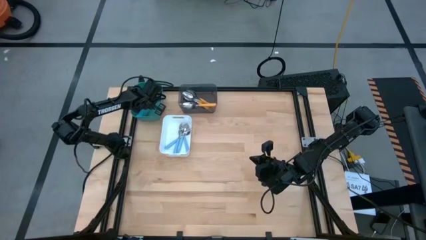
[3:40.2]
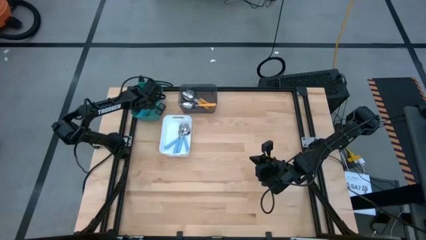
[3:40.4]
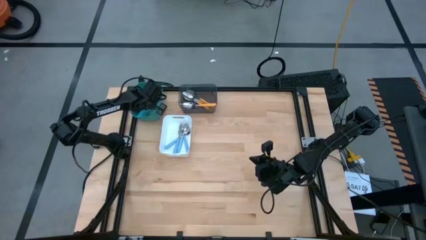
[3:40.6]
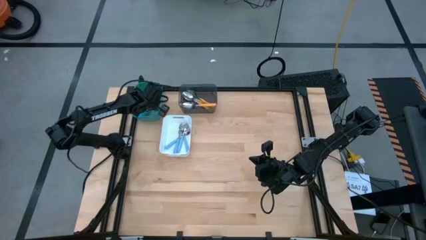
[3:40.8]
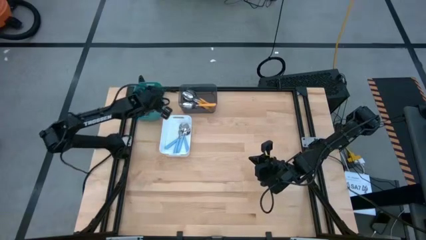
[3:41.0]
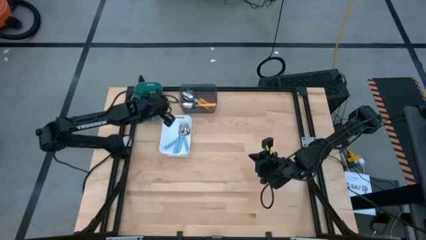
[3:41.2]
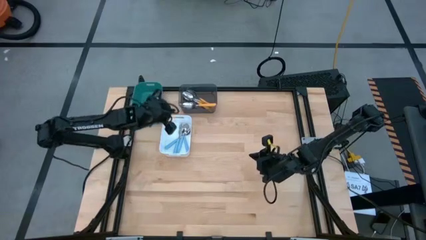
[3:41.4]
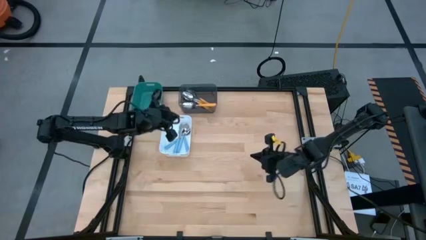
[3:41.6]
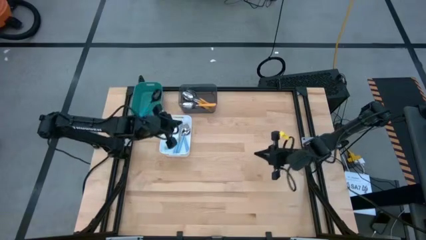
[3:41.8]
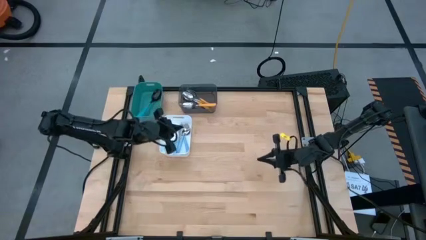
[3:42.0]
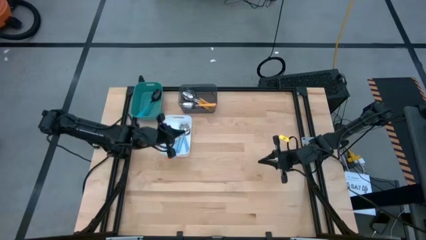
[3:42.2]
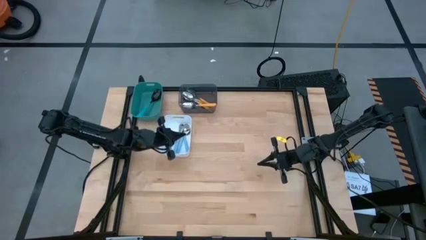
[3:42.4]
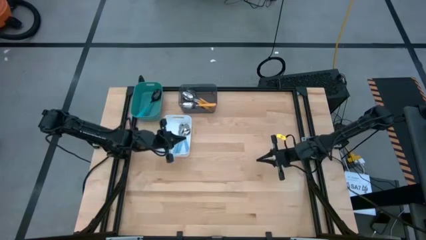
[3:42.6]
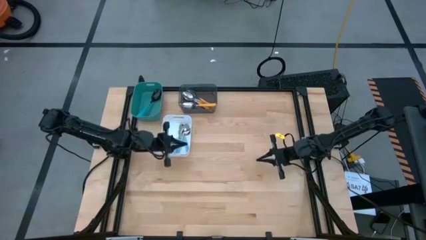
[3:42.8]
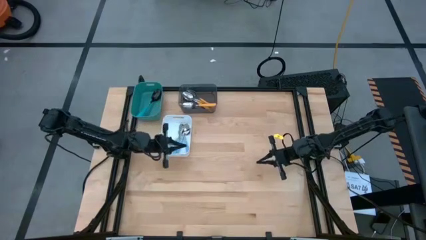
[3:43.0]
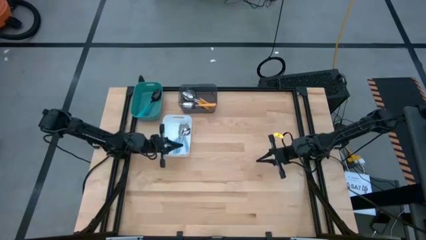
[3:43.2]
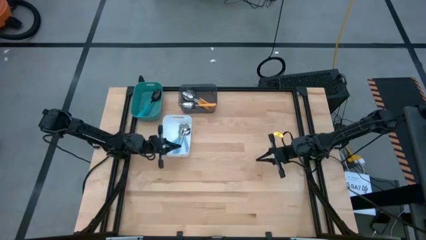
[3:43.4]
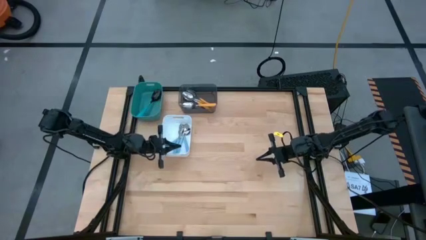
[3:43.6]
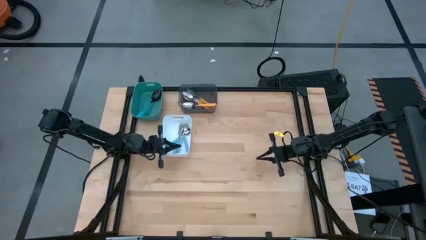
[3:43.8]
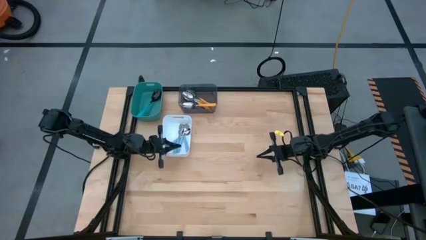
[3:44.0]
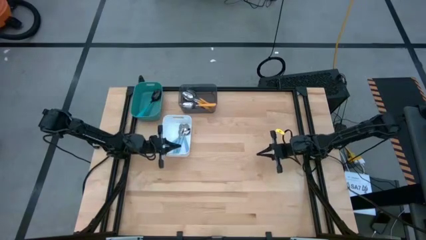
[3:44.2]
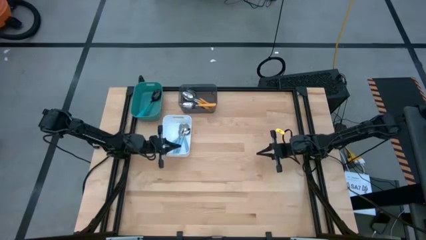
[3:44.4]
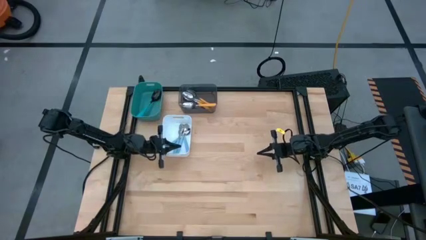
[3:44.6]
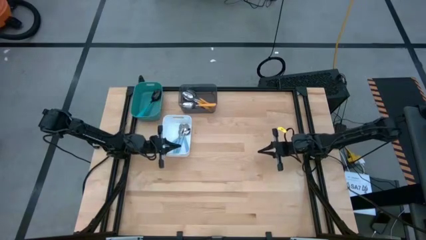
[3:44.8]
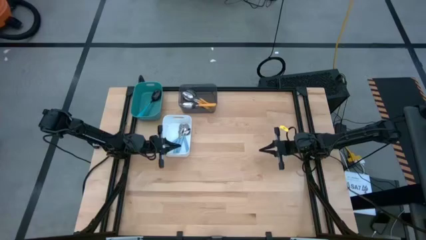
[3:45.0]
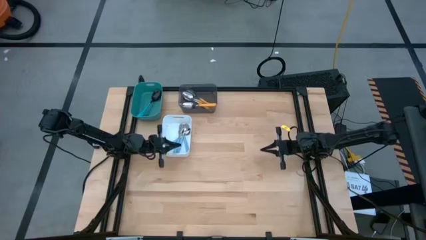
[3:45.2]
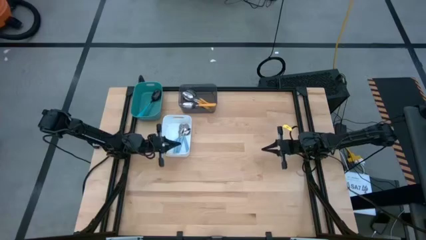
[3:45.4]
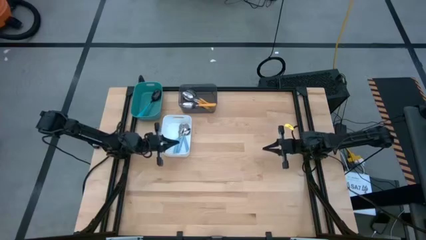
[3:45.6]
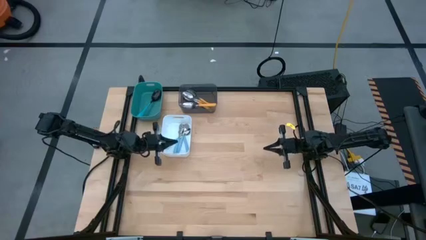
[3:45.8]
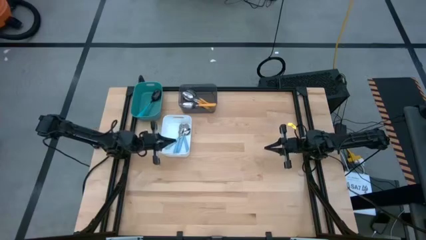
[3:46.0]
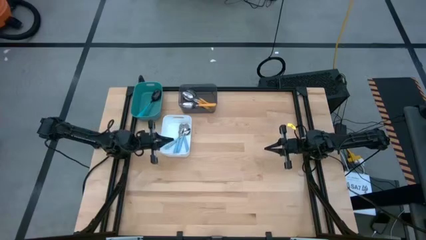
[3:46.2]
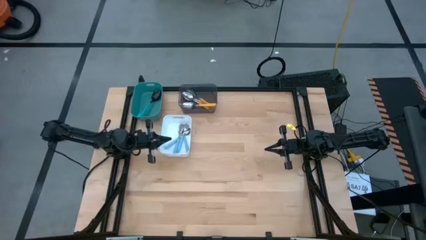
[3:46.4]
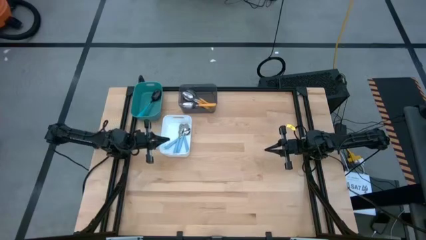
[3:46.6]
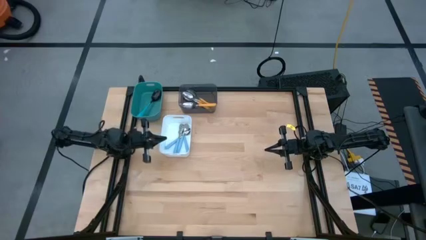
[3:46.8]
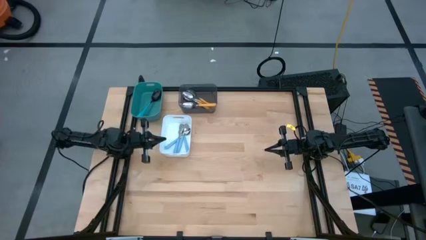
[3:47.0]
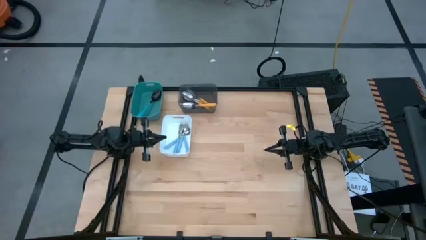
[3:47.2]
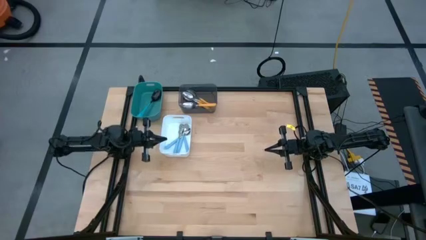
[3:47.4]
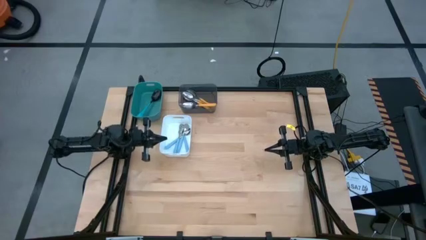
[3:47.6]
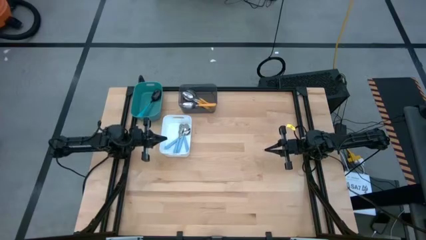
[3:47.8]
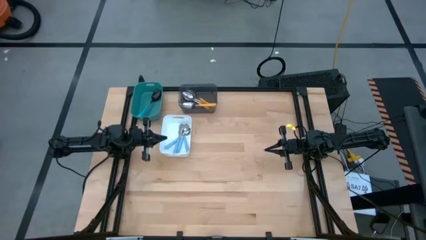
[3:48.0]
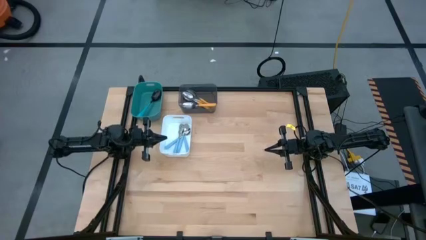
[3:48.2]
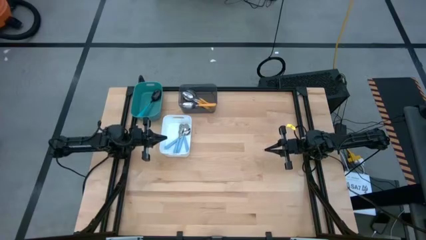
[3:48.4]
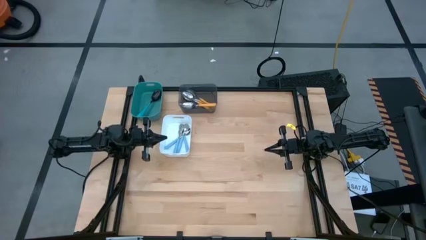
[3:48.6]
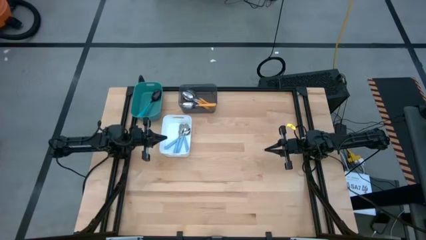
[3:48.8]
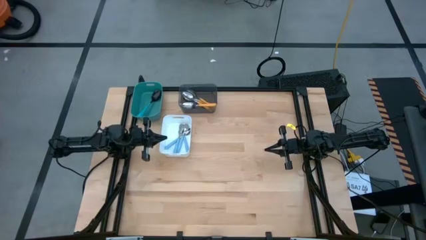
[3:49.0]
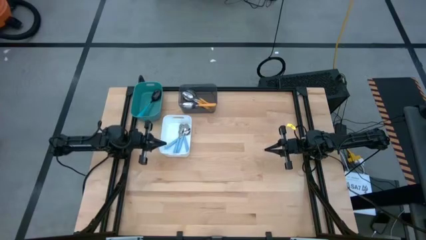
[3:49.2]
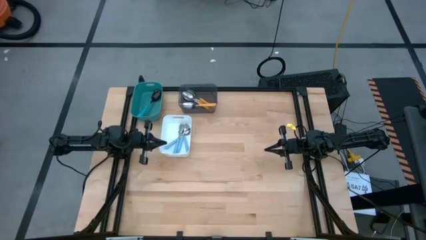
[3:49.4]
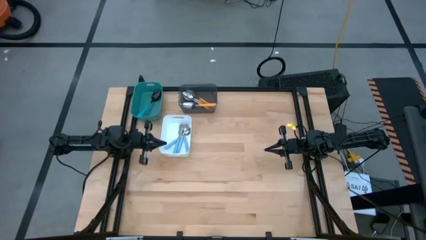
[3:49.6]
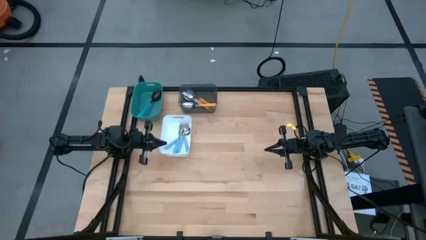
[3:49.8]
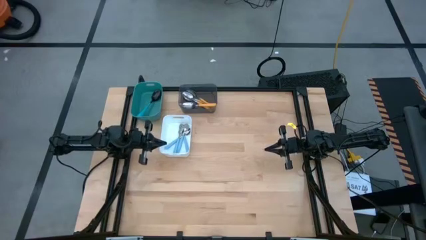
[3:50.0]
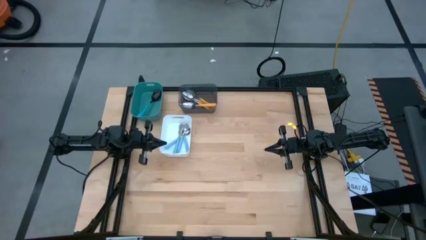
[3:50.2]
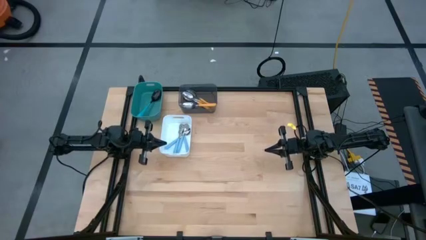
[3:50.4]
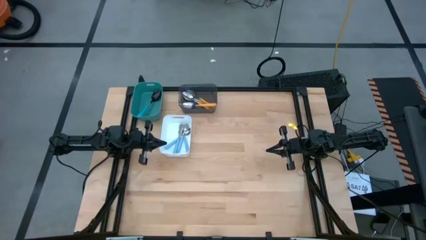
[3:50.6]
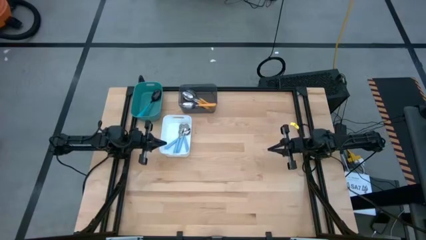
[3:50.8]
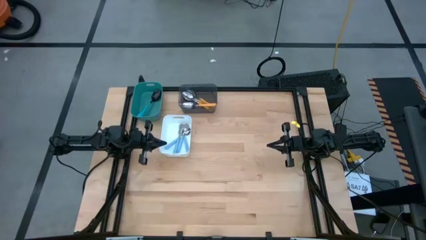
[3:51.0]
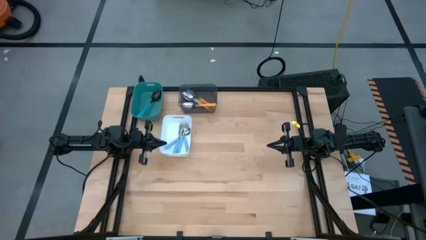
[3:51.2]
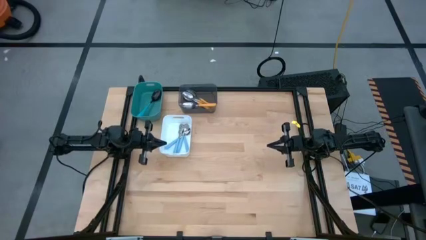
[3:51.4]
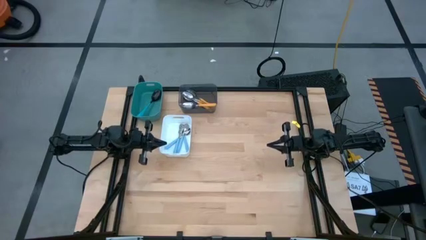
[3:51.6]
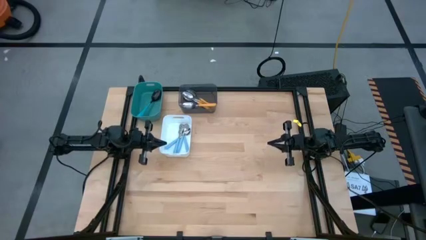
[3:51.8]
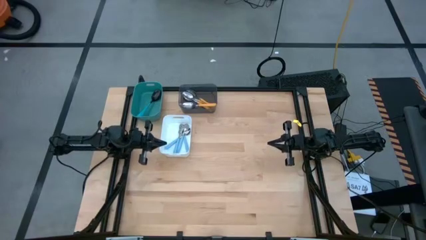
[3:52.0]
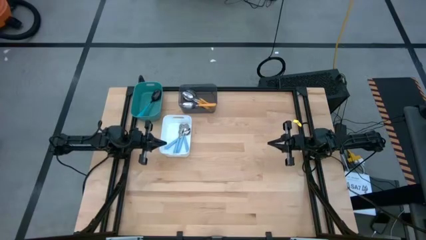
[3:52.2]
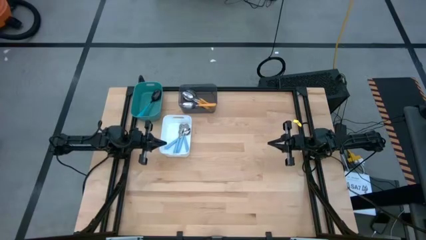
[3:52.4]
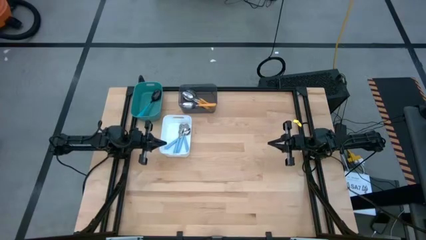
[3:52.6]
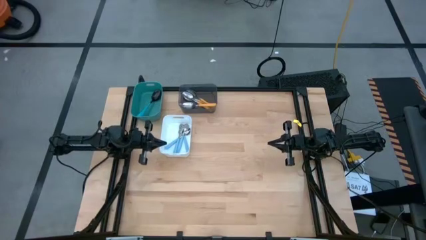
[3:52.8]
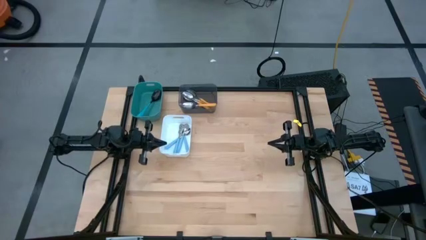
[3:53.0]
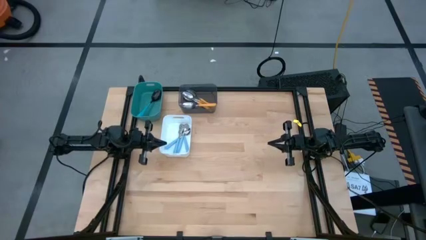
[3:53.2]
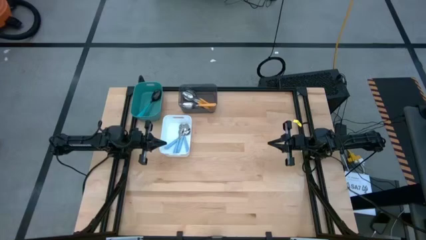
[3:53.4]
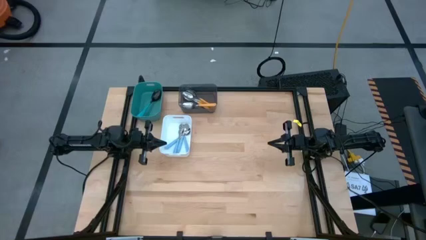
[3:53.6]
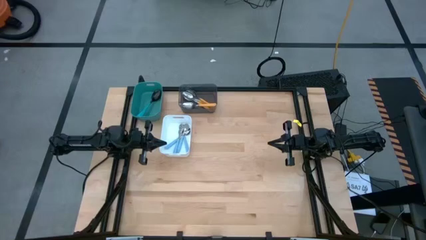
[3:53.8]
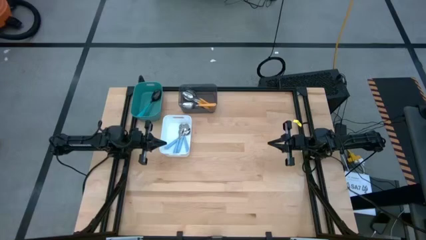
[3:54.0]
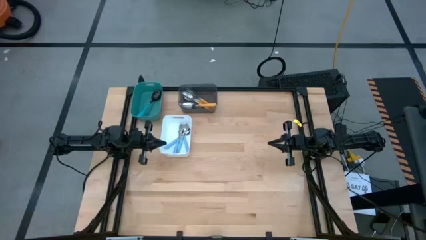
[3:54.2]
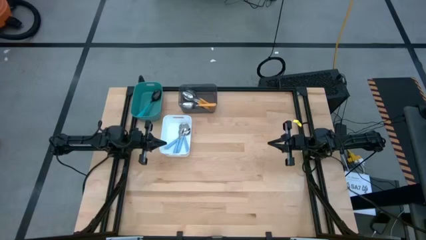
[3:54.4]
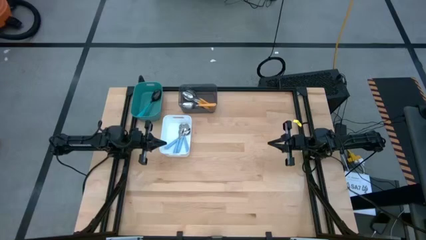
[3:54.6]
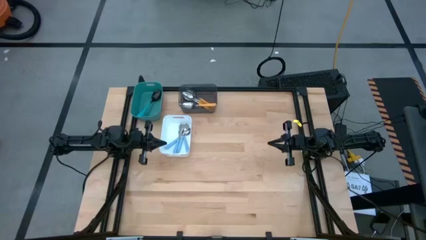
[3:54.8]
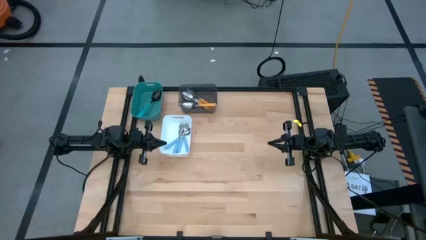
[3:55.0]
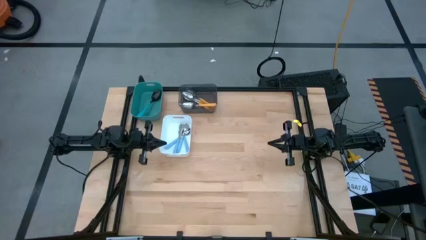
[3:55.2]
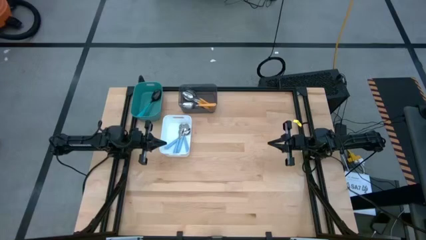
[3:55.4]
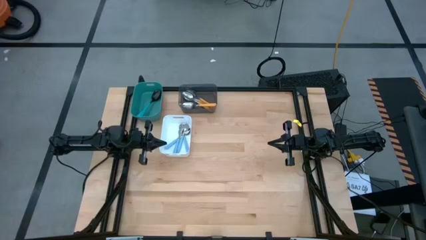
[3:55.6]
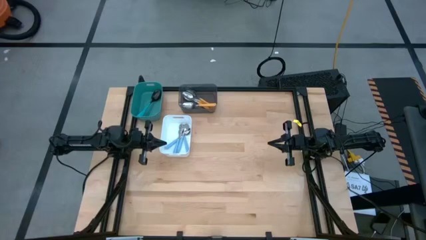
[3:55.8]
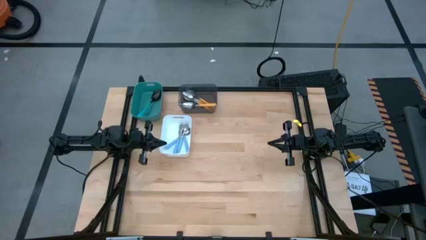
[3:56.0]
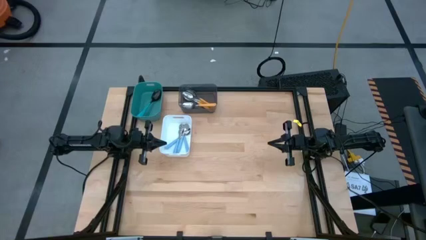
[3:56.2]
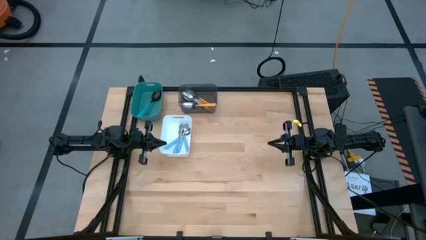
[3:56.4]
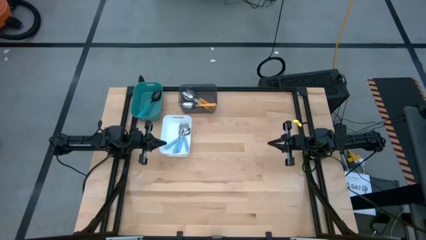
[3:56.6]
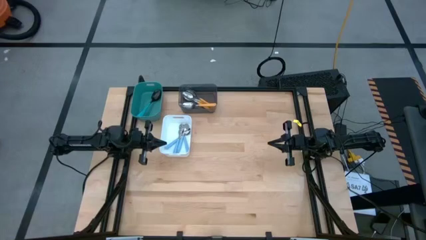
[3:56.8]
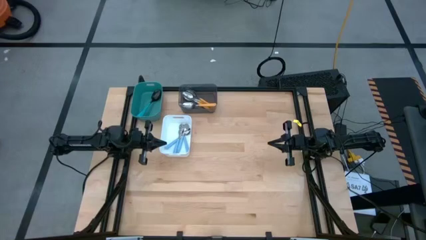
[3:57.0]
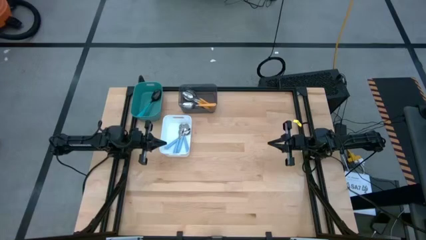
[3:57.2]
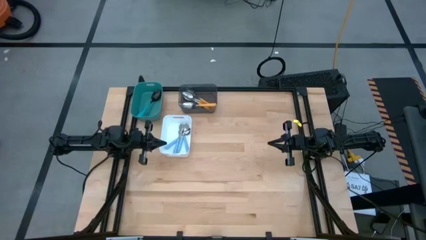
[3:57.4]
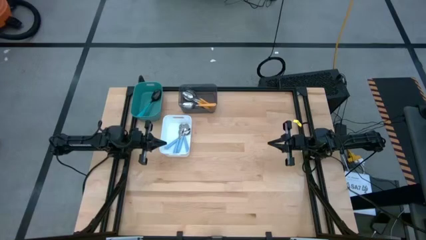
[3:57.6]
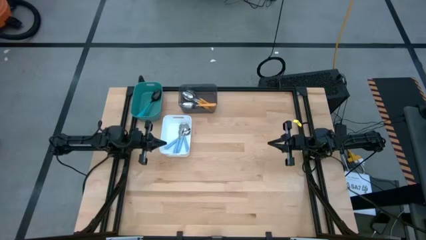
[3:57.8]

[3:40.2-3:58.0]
Task: Sort silverware by color (type)
Return To Home Position
